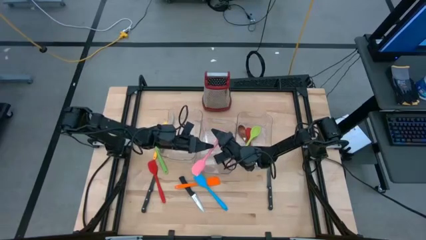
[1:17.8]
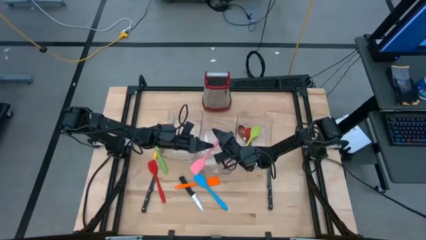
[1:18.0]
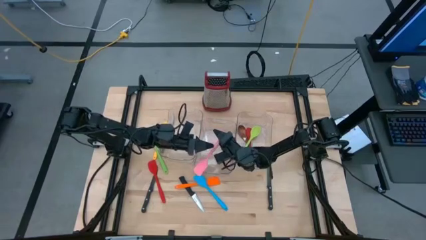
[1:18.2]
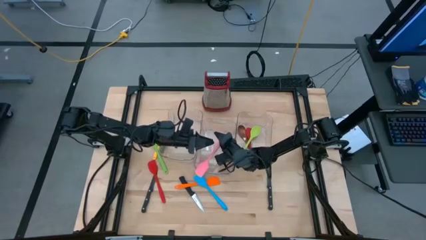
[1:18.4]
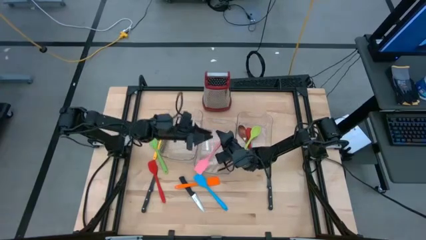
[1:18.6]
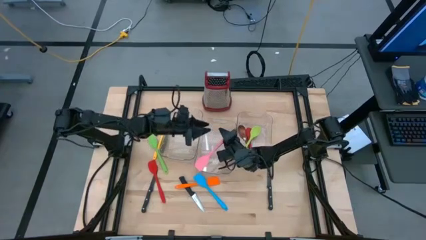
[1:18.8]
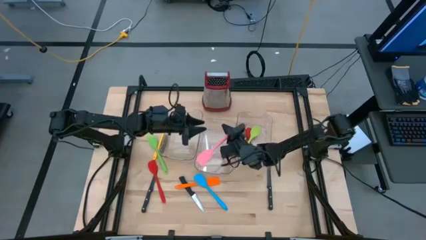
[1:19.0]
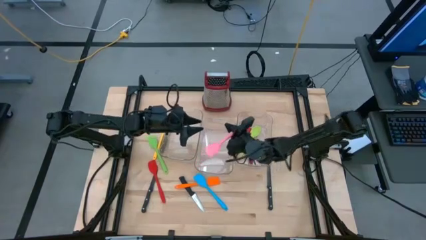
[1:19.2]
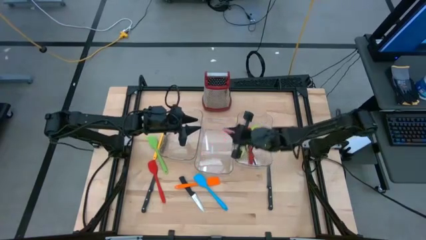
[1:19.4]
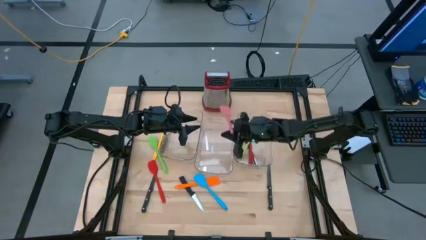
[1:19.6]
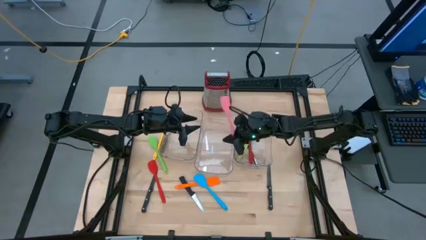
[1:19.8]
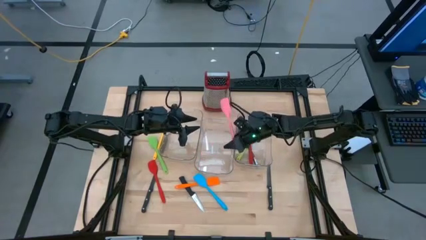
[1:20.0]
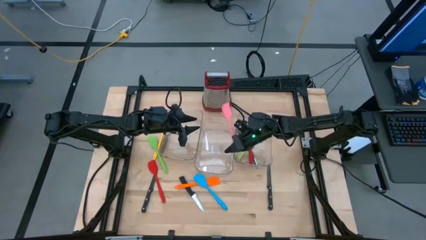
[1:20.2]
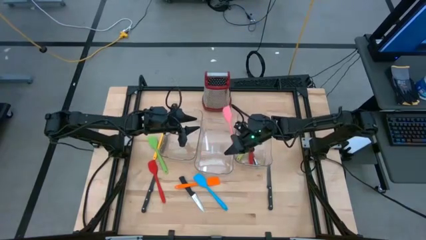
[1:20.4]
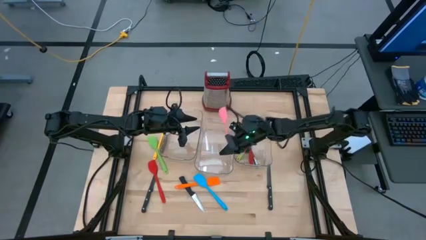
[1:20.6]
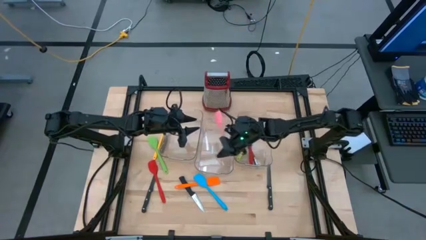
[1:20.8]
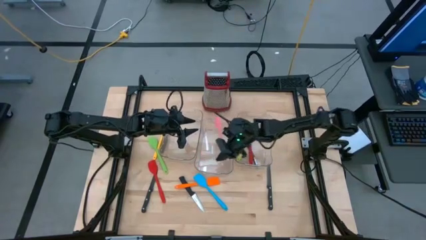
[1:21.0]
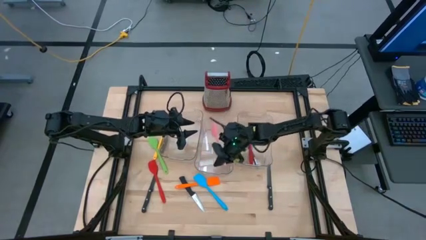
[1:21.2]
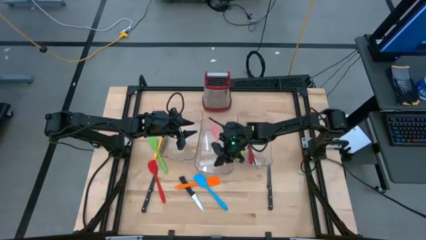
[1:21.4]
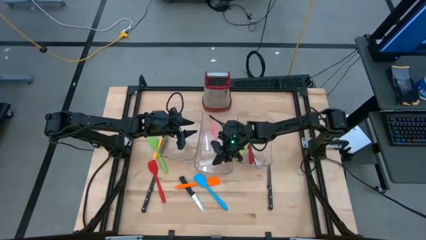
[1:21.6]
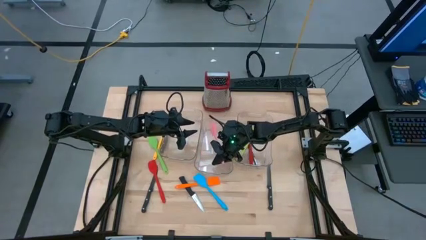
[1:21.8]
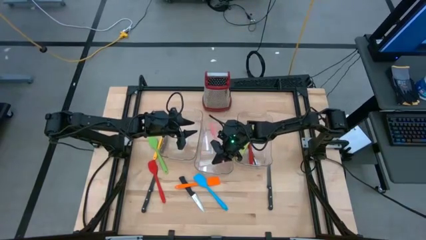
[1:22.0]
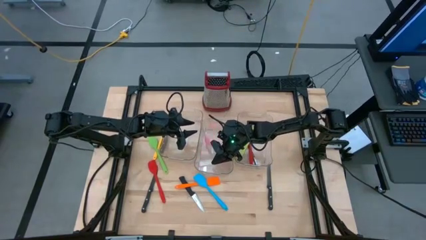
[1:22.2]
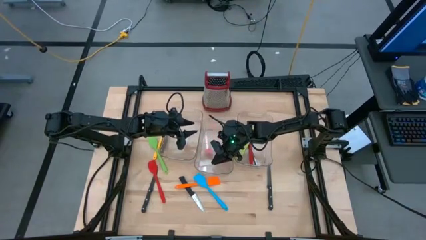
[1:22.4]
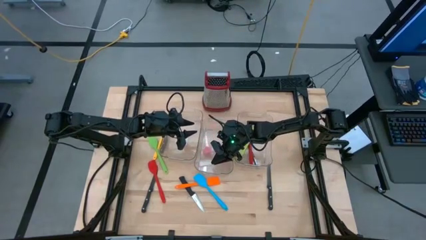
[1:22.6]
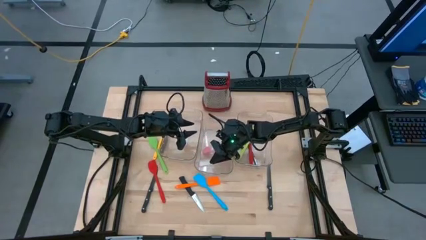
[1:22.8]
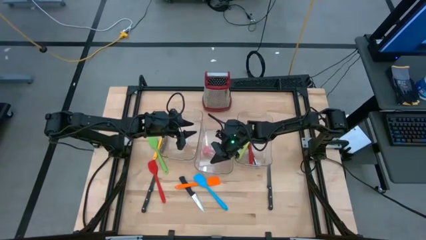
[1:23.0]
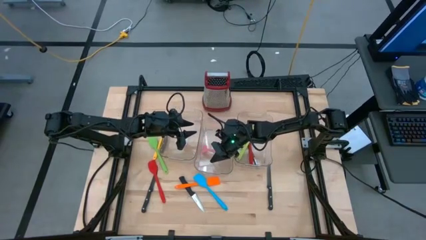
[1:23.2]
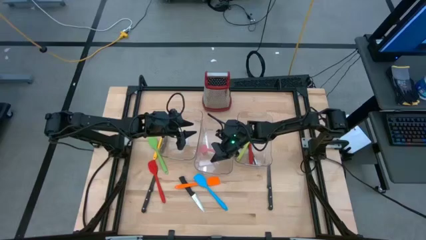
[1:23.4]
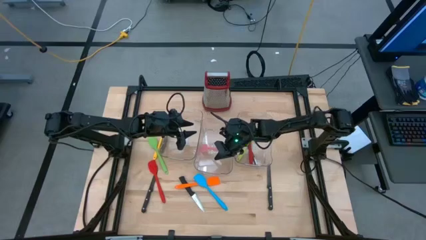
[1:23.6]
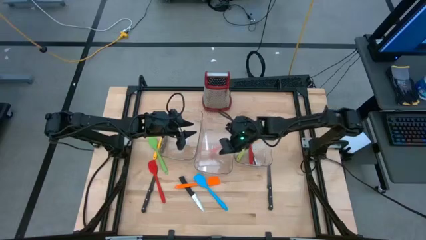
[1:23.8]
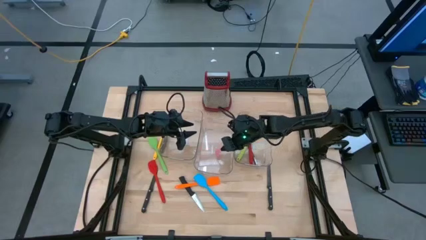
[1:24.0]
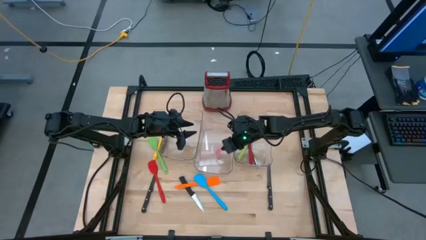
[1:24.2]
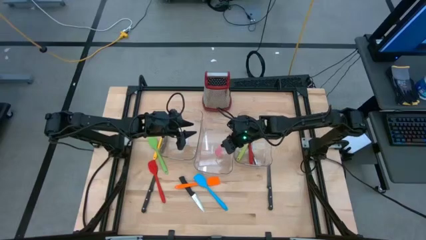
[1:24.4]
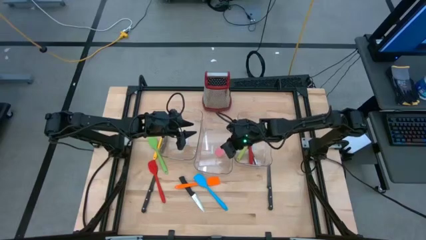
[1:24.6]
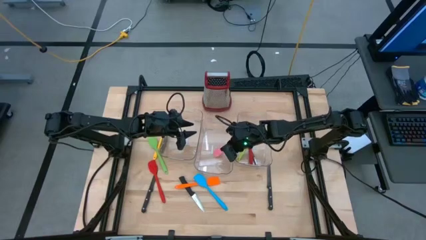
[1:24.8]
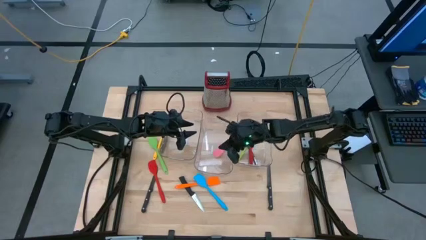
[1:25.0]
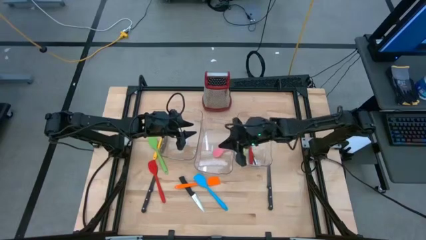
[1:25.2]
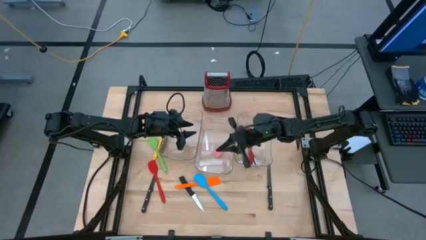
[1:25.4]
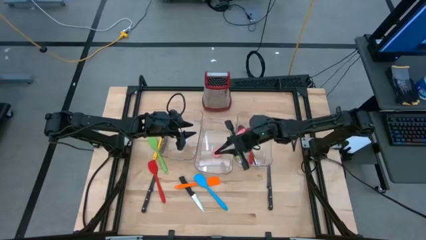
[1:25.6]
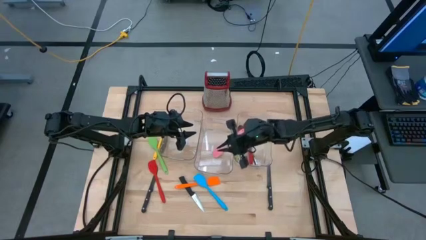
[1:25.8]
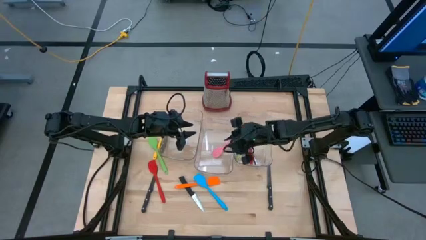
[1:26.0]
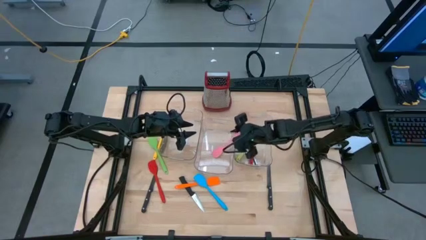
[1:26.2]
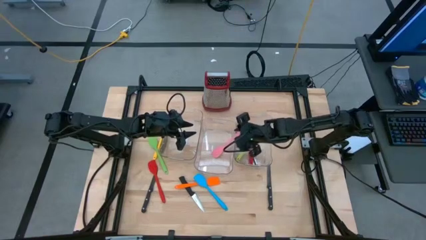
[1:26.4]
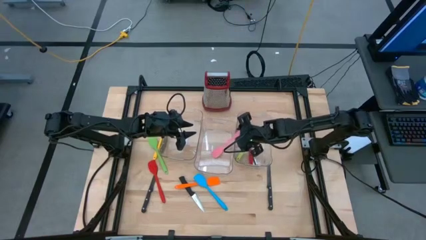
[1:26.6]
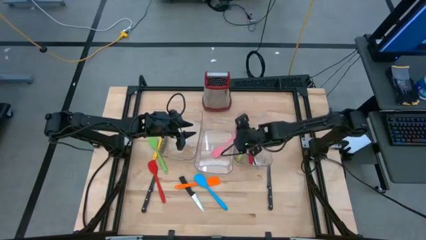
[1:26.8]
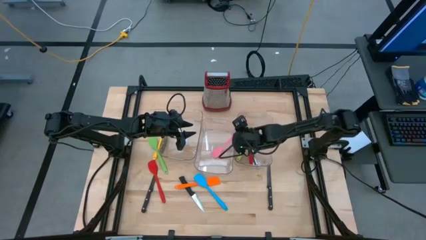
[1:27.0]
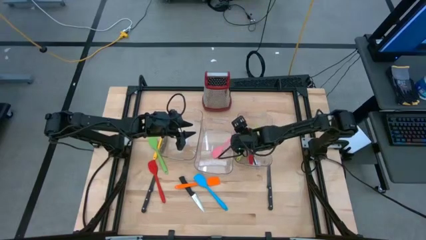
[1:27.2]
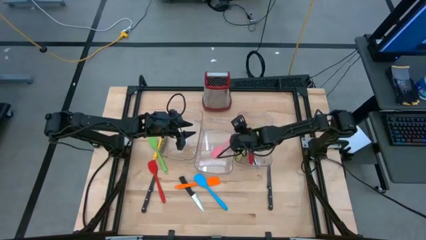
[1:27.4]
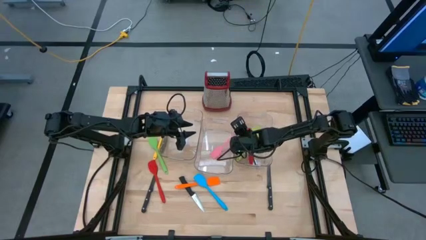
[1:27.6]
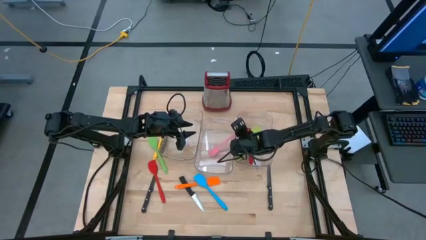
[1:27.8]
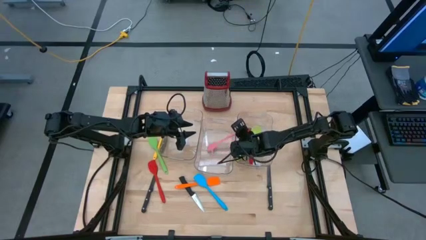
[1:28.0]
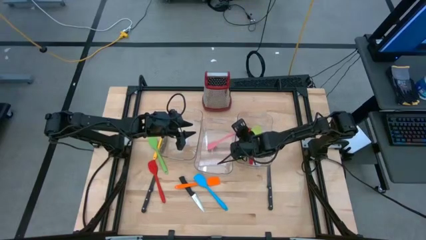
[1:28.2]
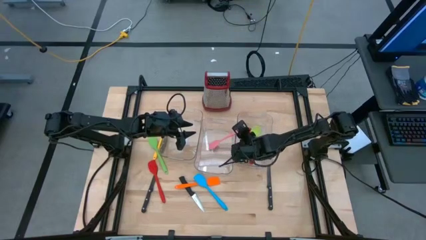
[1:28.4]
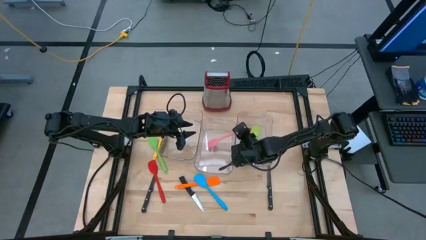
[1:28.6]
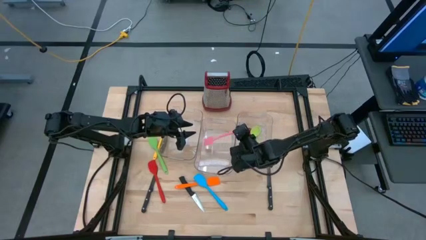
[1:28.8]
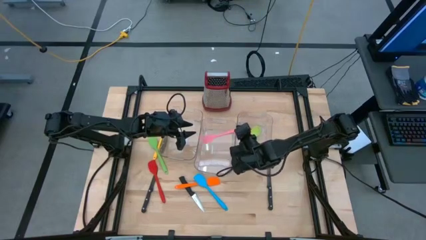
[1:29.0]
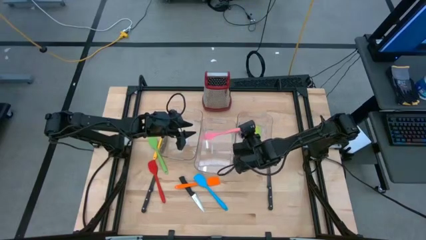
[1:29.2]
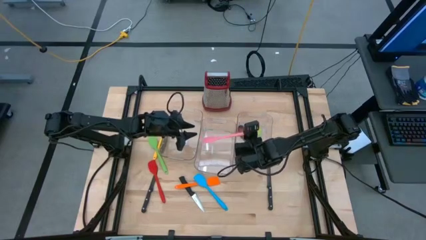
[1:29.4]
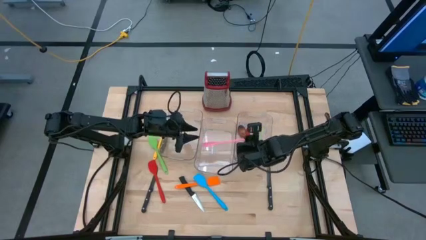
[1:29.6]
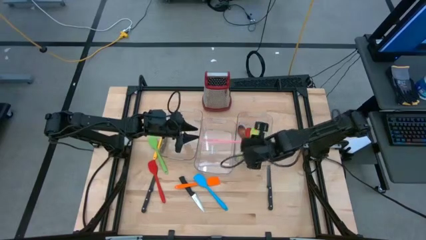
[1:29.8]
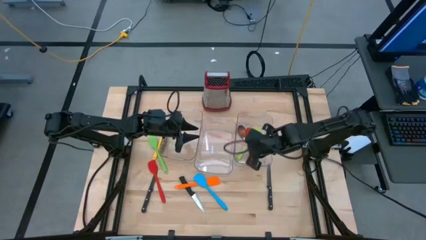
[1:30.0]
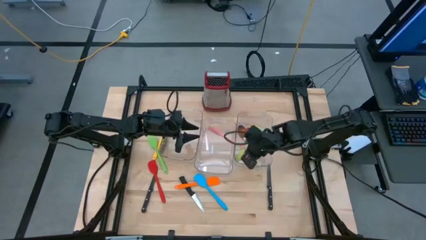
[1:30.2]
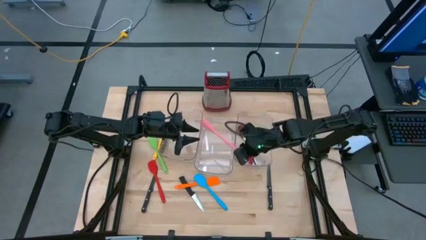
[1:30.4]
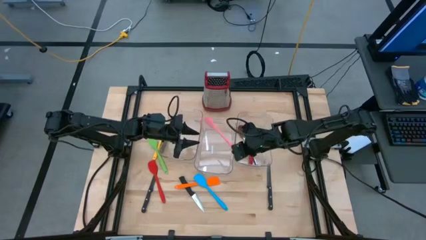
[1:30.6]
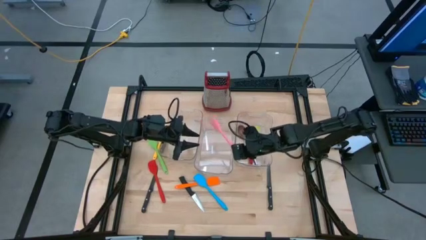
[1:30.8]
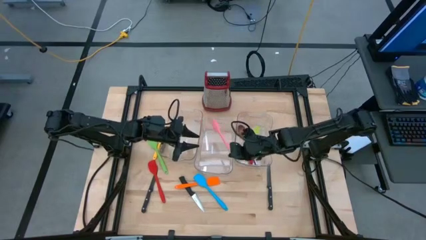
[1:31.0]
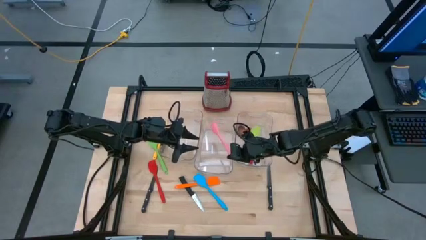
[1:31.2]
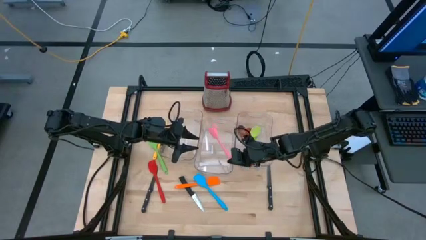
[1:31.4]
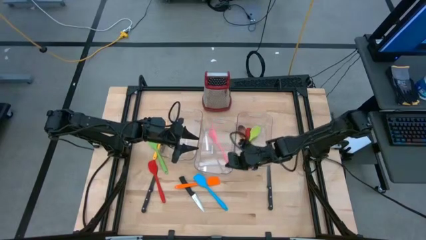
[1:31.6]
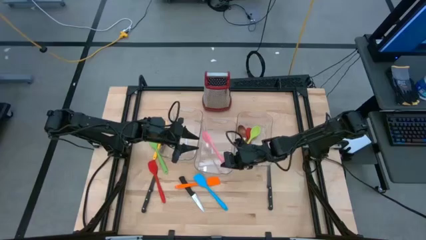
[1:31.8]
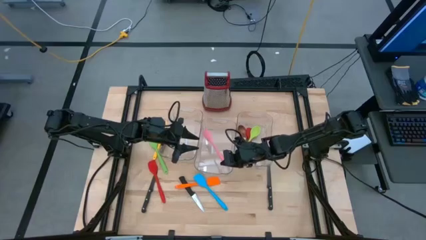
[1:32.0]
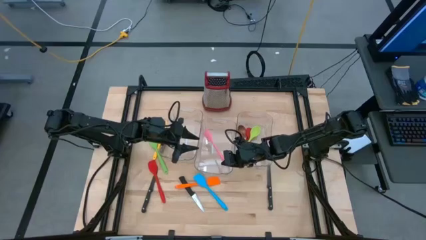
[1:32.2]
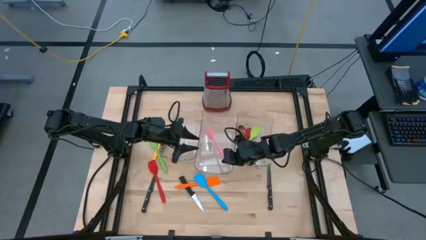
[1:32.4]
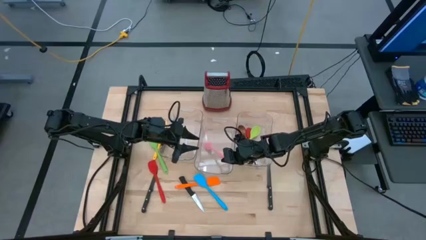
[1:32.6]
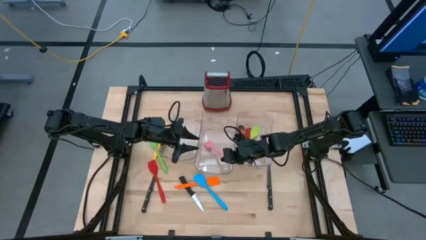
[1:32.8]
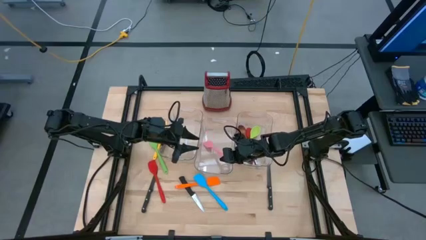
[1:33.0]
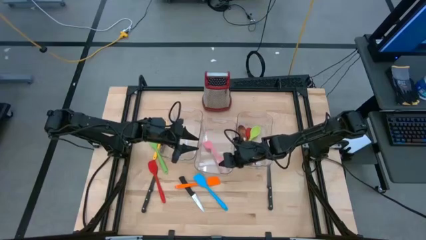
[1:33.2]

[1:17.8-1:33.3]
Task: Pick & Place Kitchen Items
Put the pink spatula into the middle transparent bin

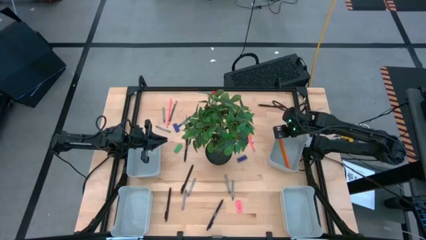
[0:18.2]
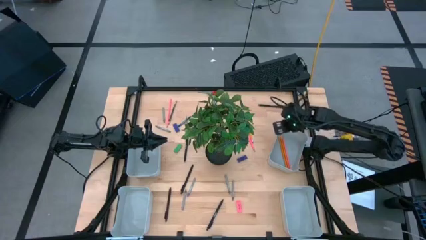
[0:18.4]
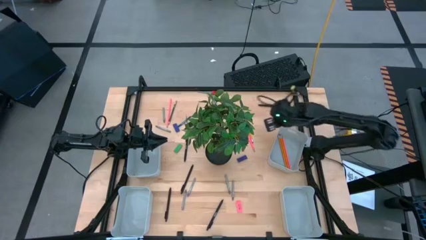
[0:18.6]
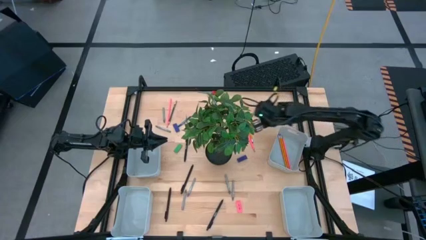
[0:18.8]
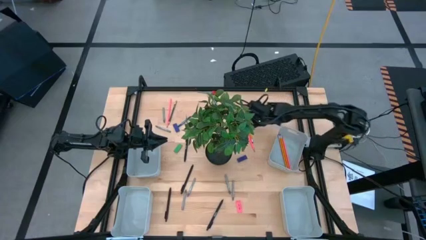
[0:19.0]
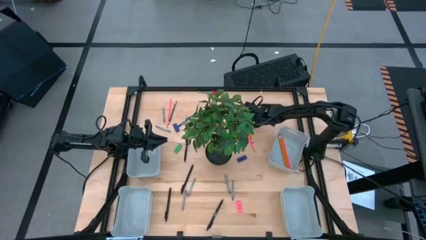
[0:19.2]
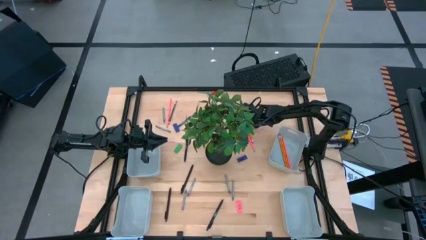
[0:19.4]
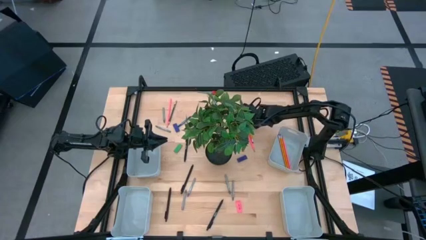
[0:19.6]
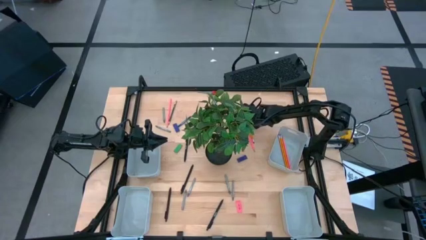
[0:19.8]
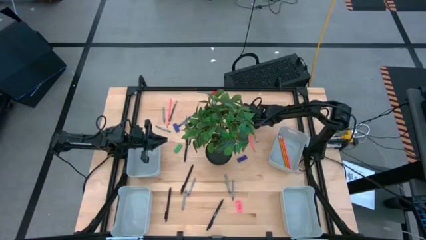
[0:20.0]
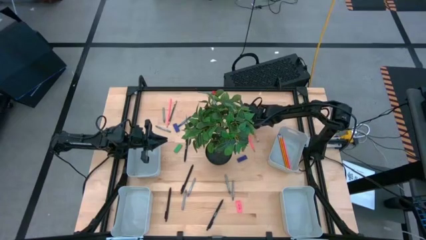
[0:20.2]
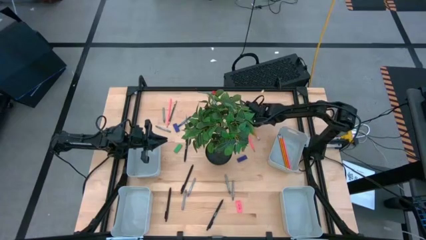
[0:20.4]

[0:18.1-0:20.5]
Task: Sort crayons/erasers/pens/pencils in bins
Put the orange pencil into the top right gray bin
